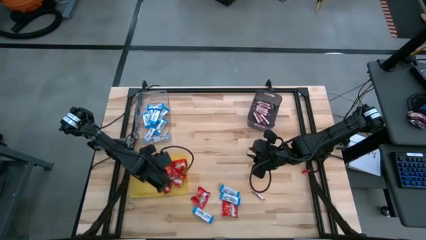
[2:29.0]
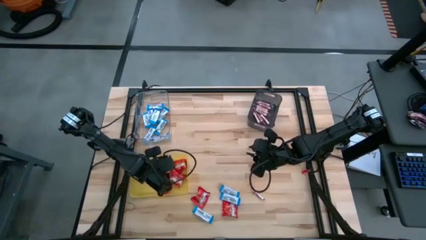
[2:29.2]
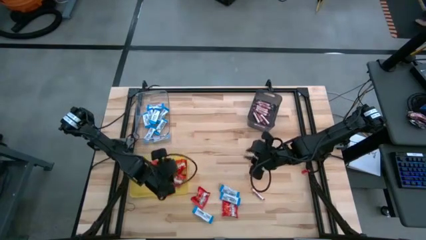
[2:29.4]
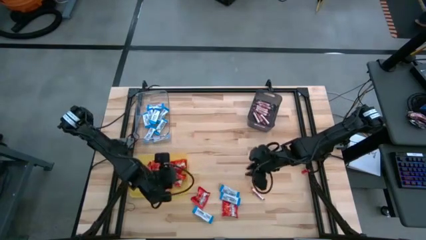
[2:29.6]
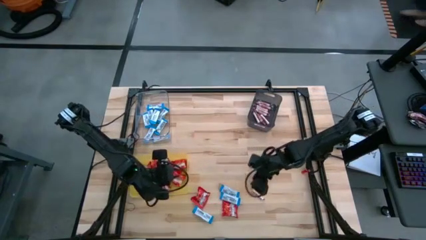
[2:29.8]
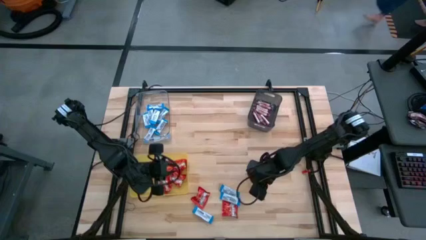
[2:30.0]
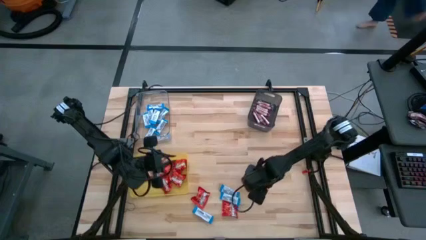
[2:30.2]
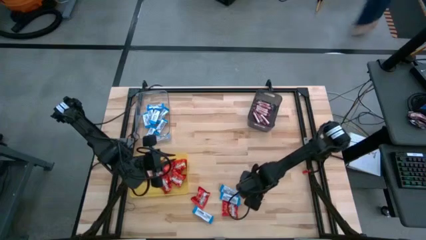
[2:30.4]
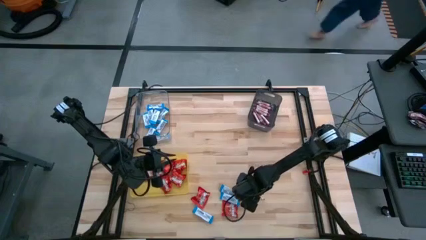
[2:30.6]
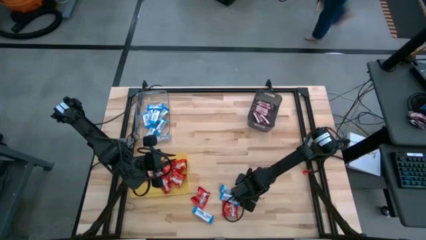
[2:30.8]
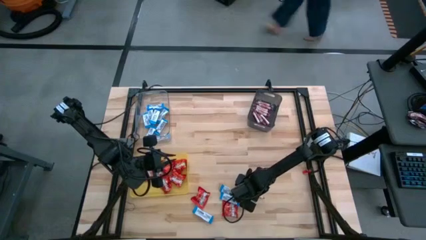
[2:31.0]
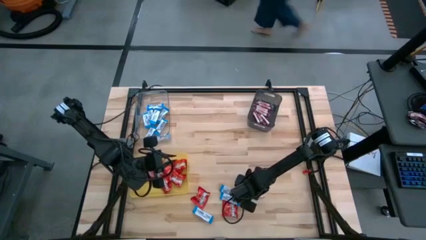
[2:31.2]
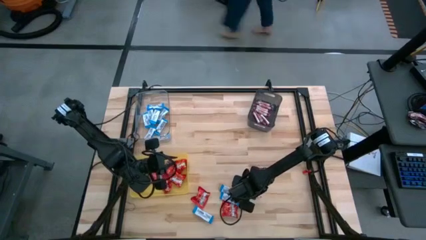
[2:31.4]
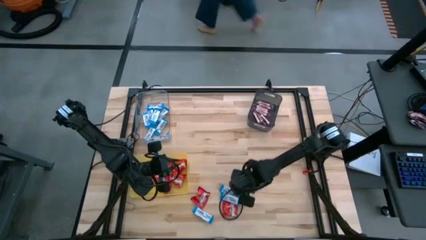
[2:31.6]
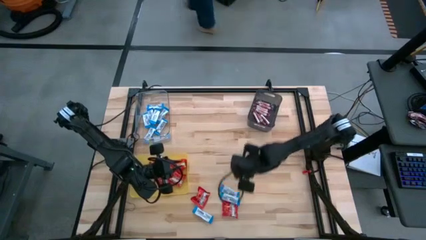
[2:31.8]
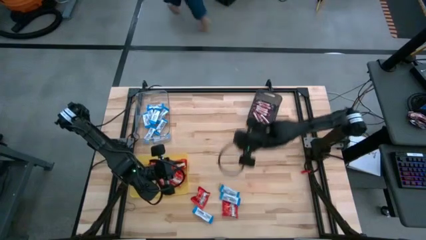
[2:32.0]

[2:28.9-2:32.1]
Task: Sort candy
Put the white candy into the black bin

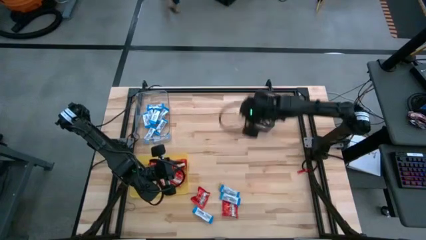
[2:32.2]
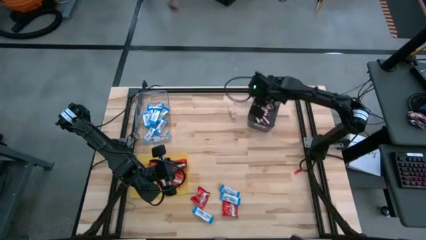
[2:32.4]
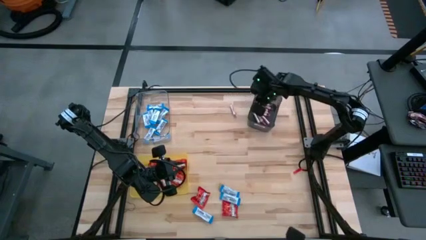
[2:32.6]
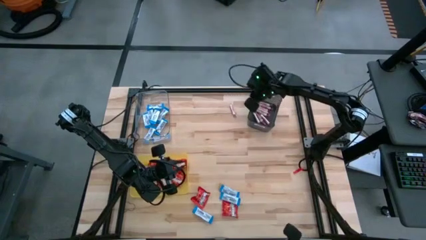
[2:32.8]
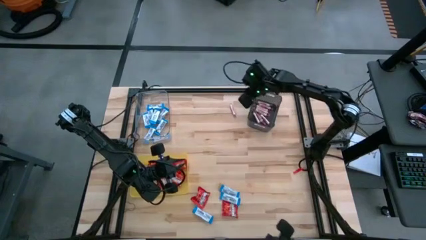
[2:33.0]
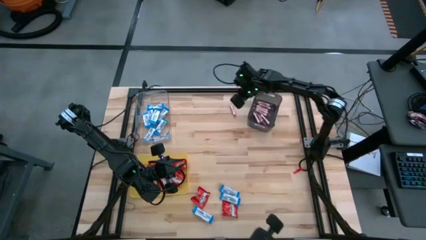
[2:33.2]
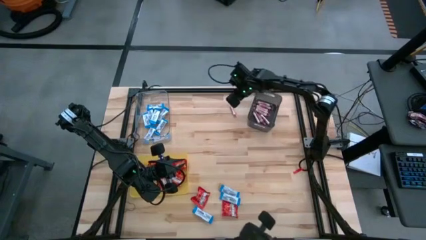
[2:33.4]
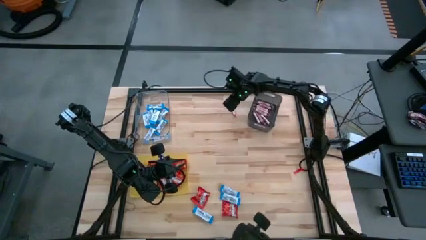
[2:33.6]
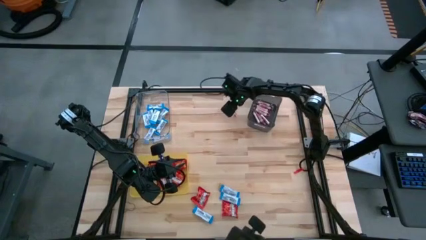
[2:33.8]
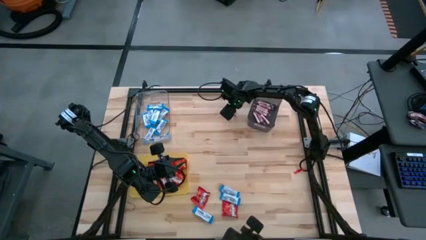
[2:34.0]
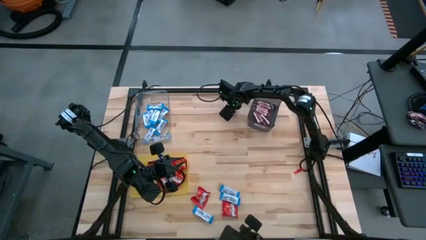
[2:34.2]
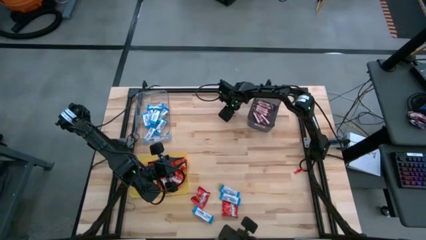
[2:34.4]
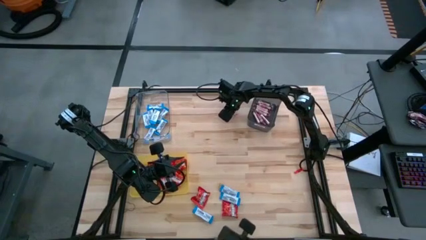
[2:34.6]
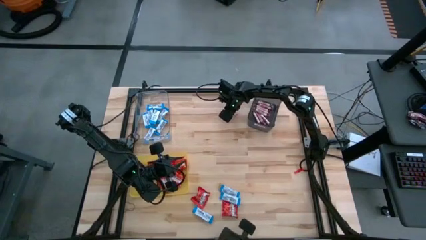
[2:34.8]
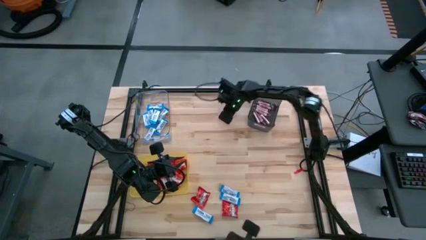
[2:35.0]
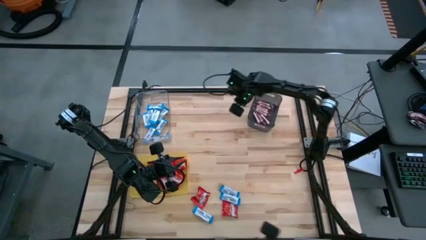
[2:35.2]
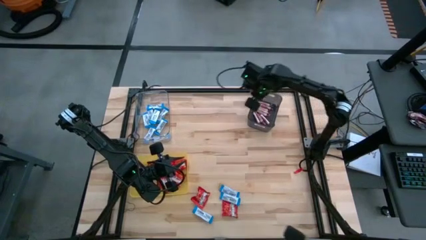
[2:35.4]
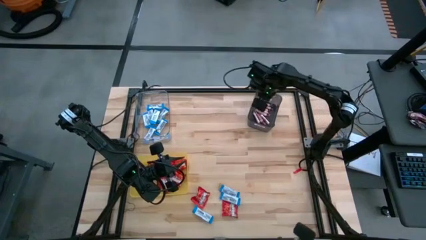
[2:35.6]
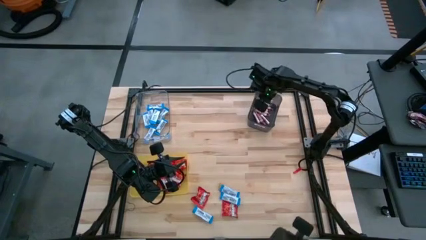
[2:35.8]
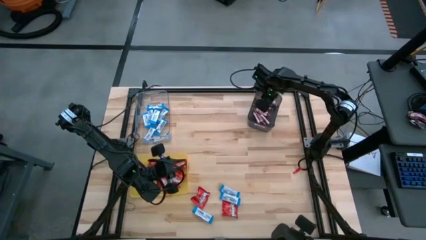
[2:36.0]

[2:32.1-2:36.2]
Put the white candy into the black bin

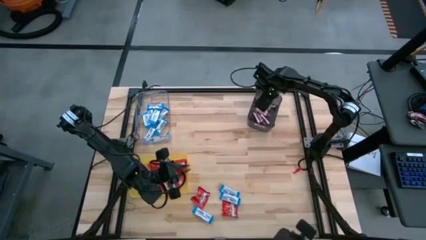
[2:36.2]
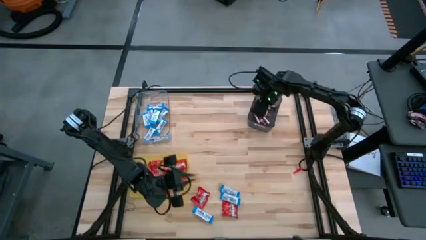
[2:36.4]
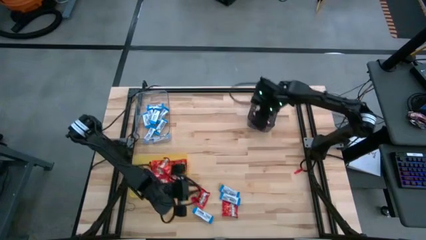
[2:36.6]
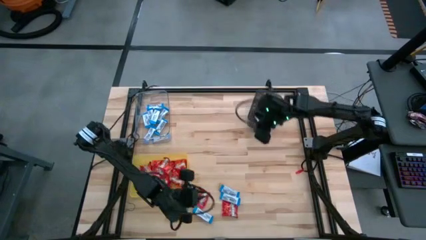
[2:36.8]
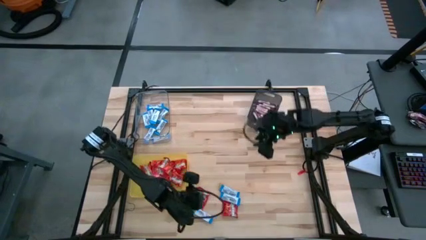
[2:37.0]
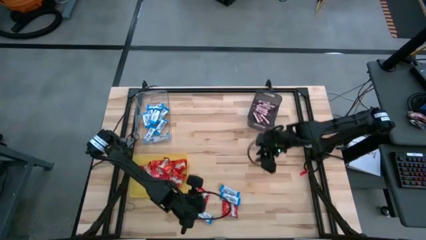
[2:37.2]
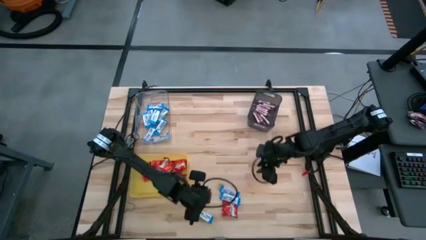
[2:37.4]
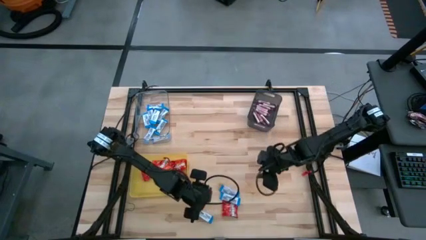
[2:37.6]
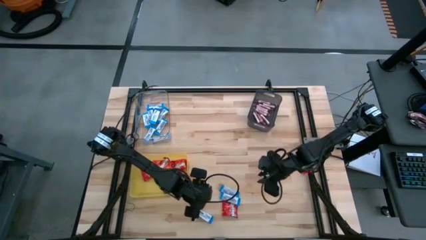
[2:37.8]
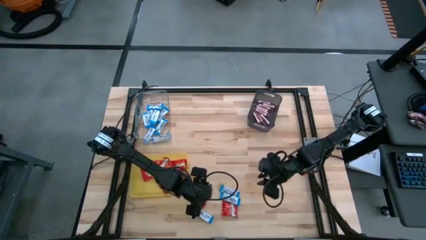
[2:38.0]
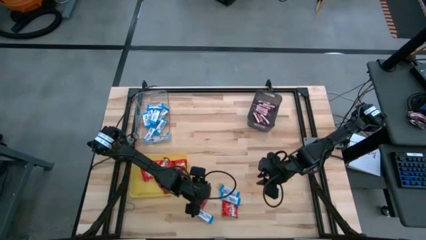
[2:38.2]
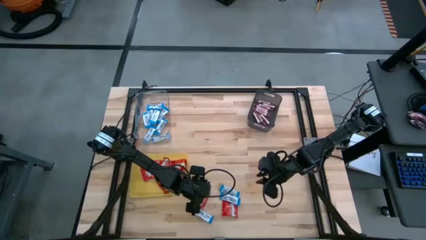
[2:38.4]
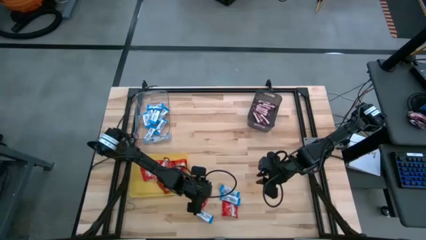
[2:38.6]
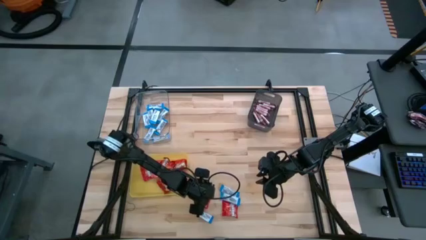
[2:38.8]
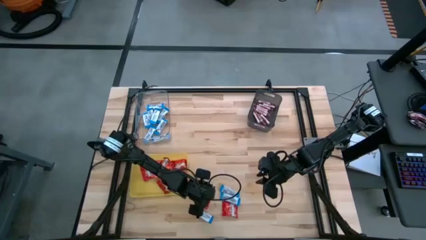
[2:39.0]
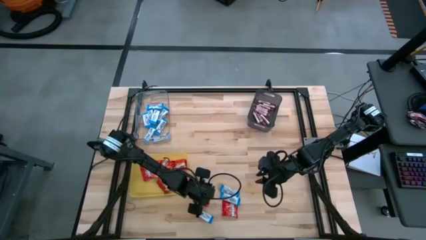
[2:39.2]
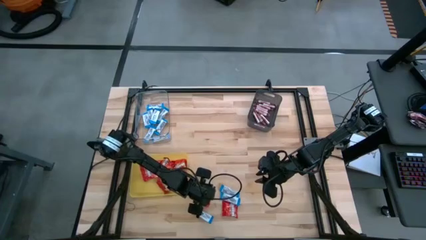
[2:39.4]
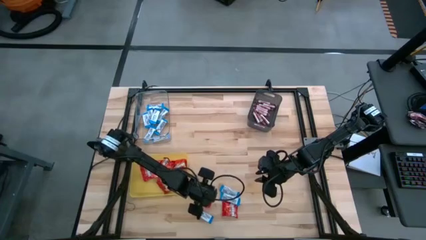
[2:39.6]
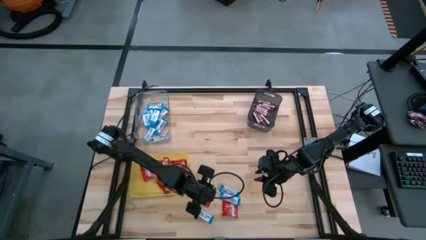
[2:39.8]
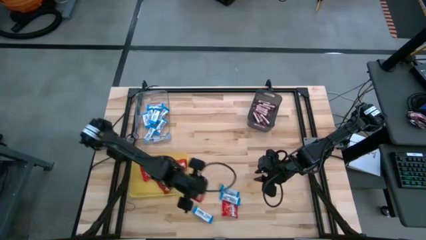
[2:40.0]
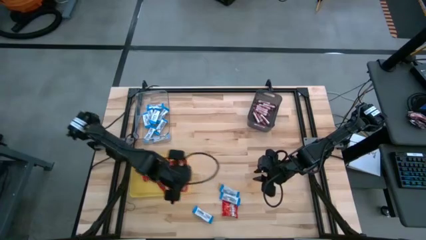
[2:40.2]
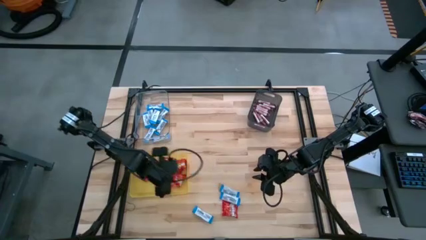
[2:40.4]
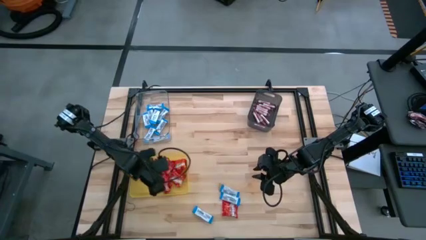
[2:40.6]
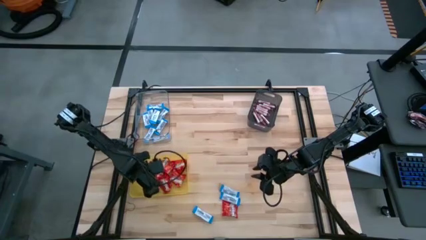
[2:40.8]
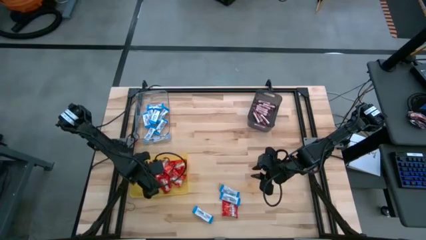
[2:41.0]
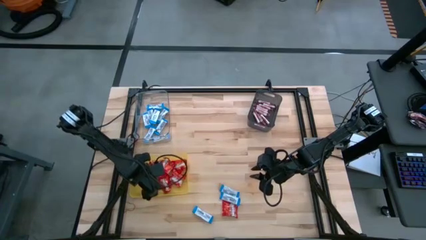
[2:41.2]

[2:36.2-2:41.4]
Put the red chocolate into the yellow bin

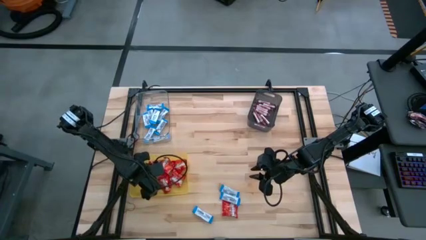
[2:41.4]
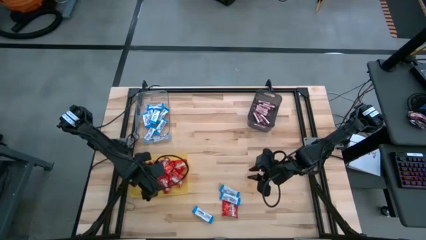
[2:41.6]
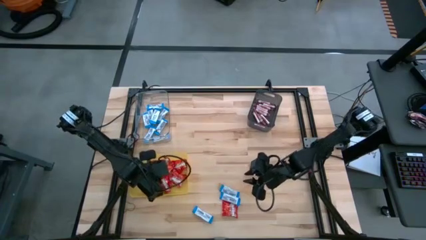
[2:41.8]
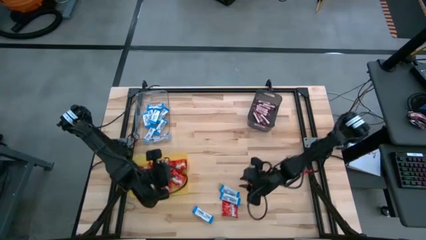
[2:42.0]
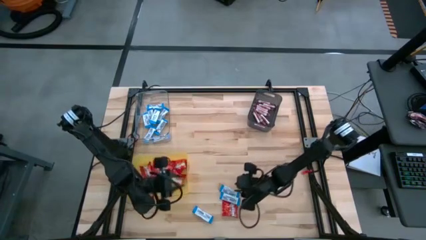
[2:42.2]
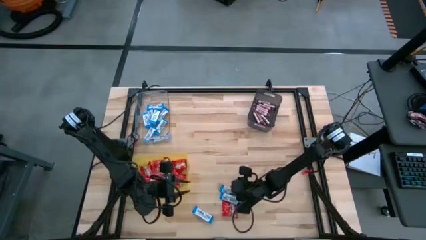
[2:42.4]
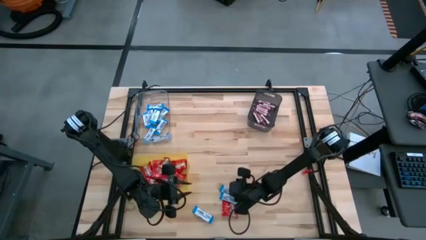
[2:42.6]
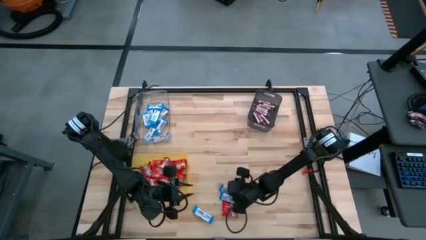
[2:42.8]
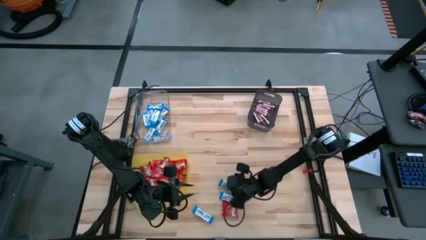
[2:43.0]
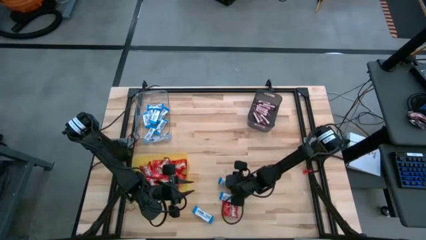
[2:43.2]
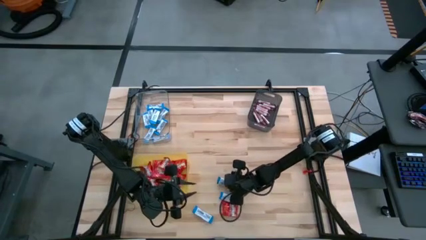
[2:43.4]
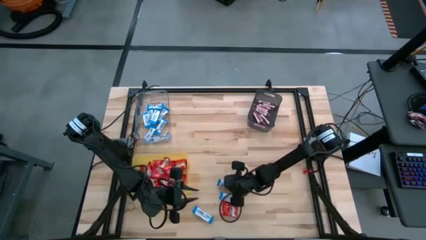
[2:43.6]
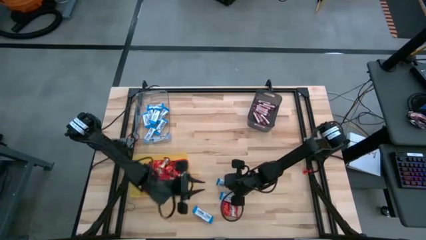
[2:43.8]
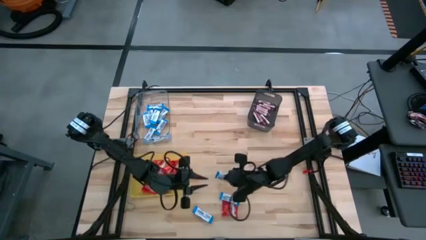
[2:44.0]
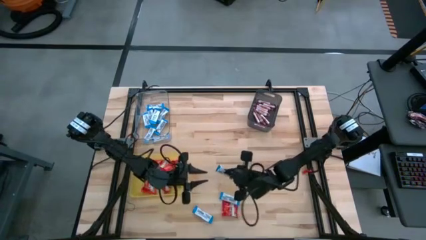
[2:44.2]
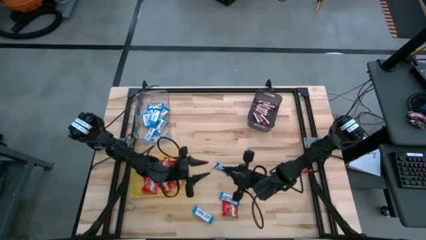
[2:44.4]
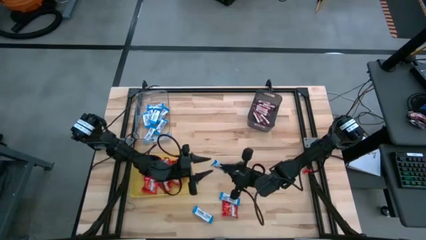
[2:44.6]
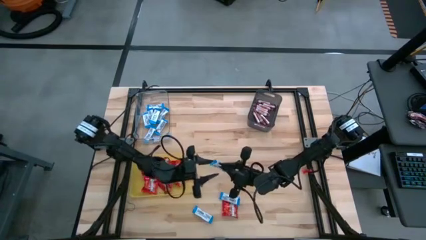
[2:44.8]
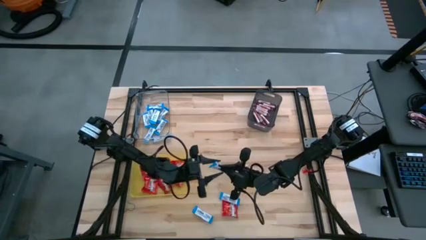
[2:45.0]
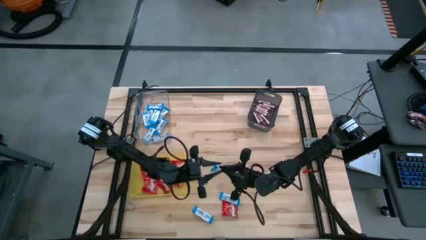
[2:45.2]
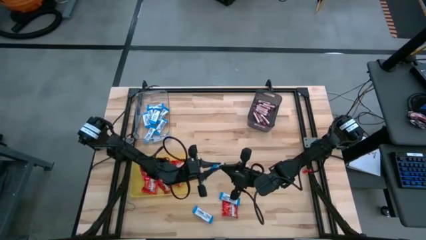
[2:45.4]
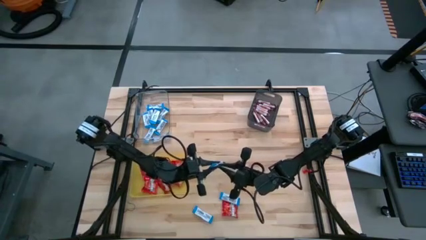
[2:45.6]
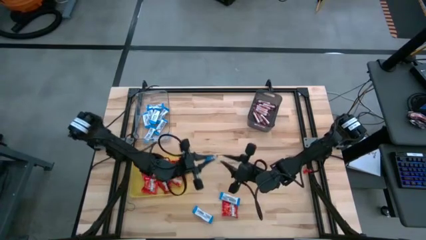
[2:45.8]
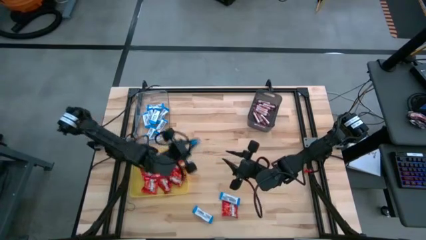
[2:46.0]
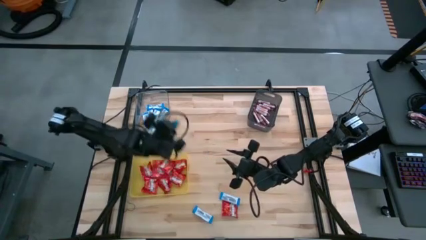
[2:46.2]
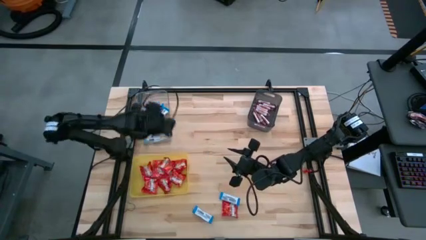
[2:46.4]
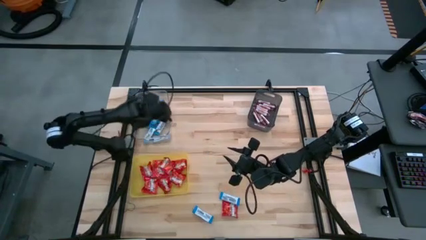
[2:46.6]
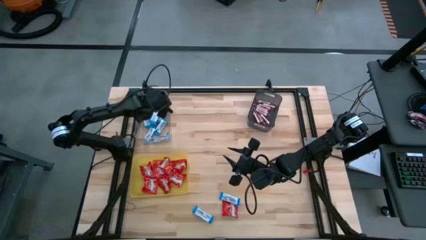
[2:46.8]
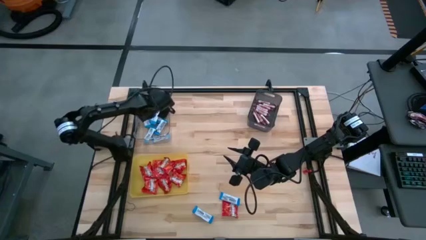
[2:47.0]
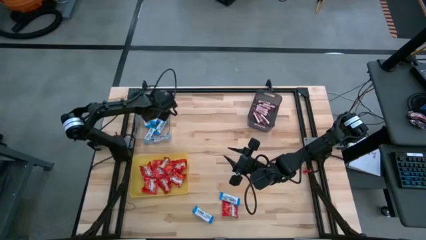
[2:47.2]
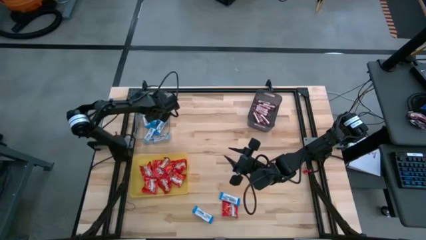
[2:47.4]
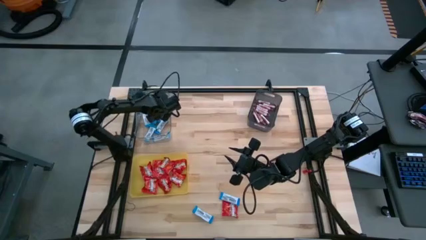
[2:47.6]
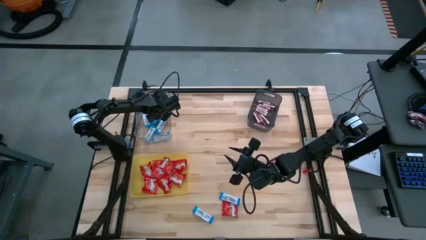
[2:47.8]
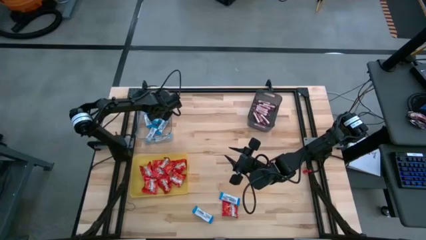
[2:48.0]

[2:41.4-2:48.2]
Put the blue chocolate into the transparent bin
